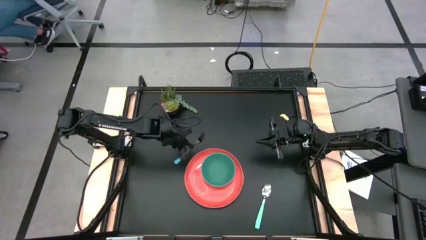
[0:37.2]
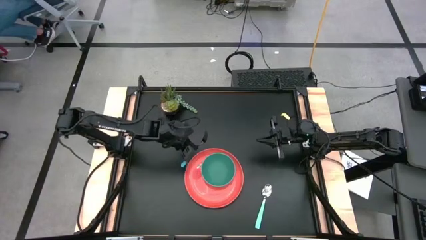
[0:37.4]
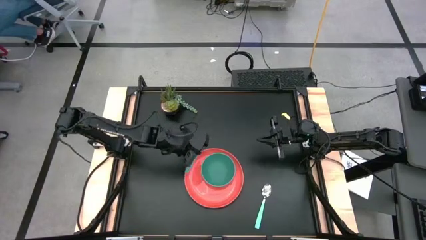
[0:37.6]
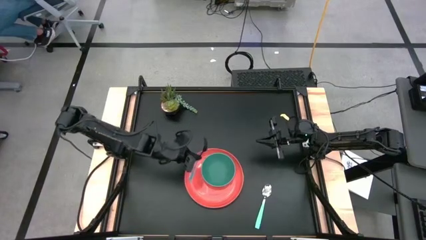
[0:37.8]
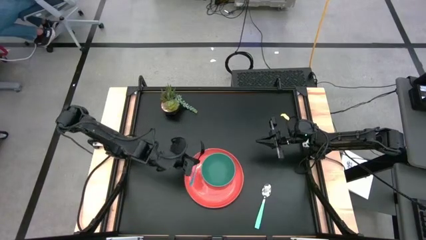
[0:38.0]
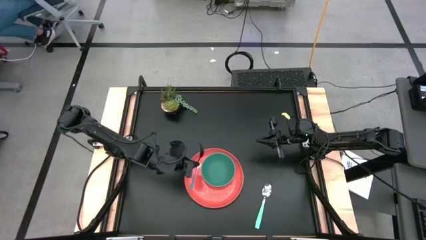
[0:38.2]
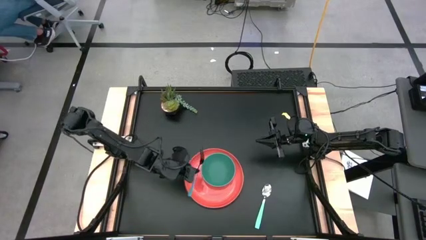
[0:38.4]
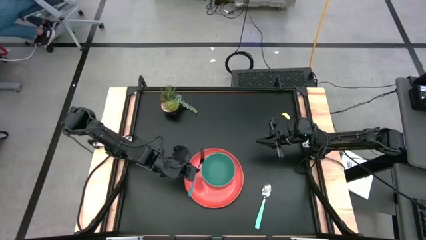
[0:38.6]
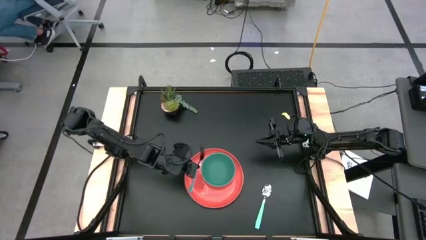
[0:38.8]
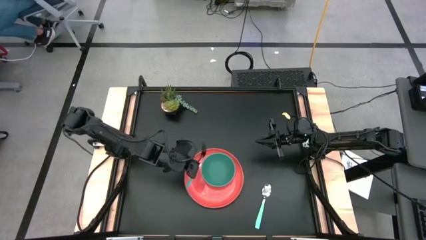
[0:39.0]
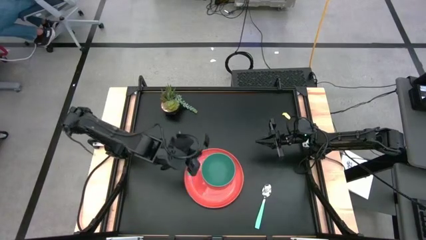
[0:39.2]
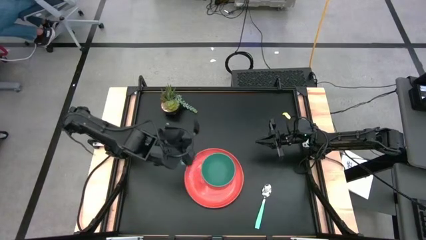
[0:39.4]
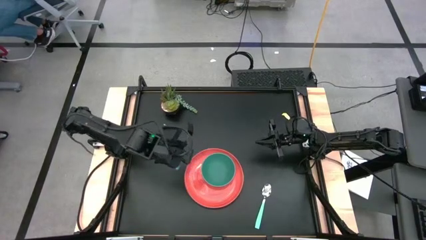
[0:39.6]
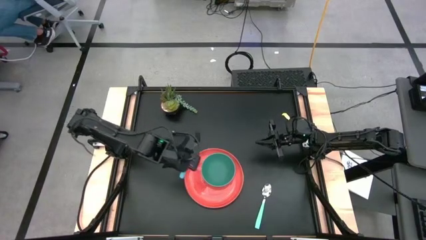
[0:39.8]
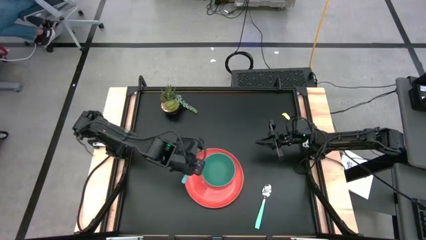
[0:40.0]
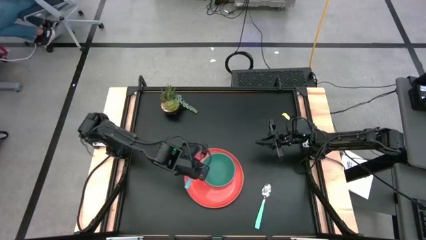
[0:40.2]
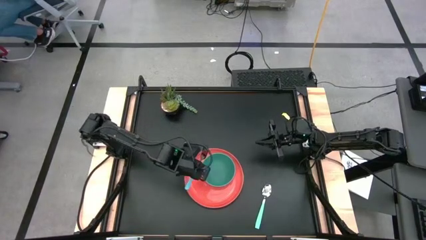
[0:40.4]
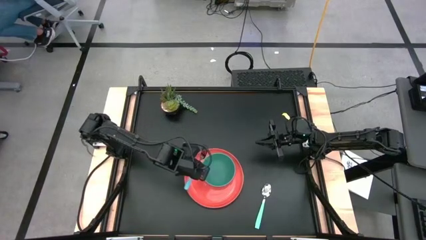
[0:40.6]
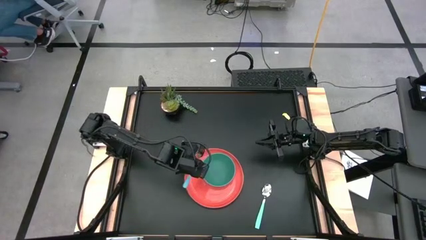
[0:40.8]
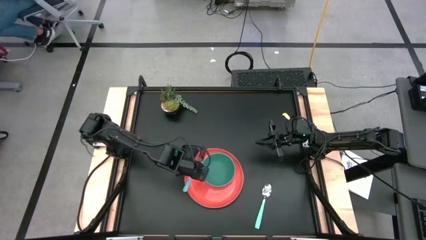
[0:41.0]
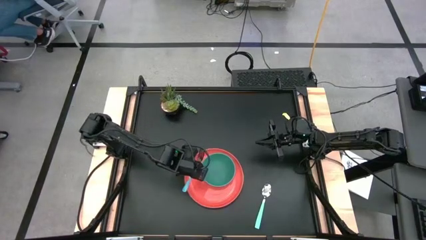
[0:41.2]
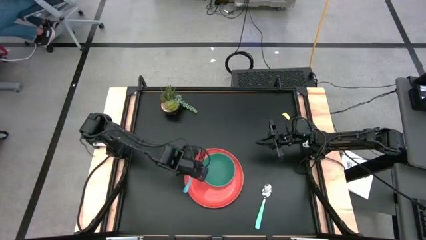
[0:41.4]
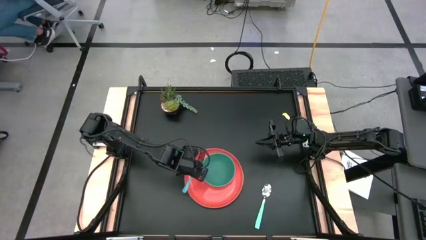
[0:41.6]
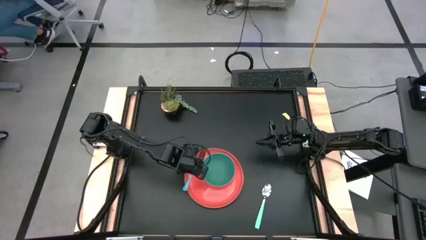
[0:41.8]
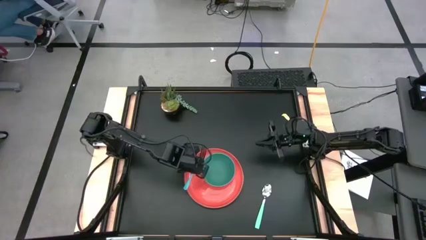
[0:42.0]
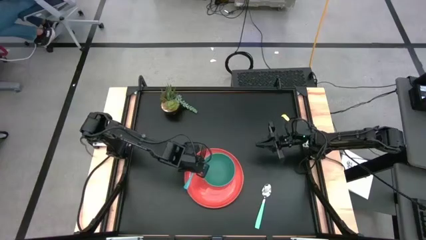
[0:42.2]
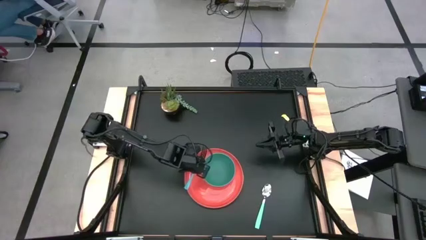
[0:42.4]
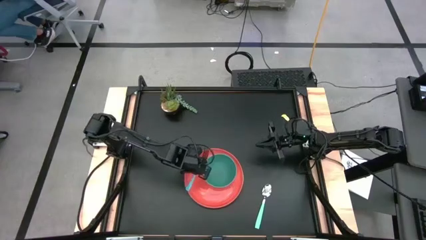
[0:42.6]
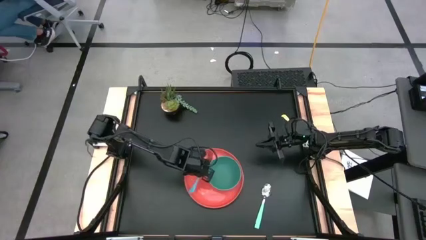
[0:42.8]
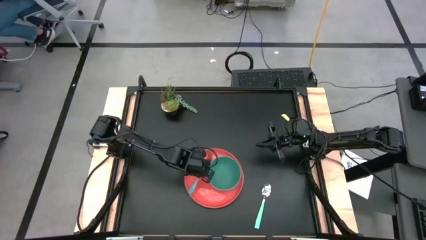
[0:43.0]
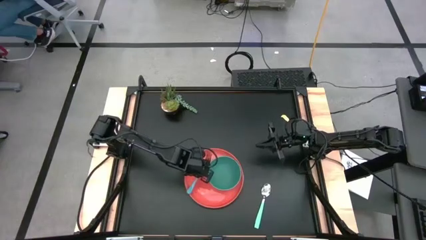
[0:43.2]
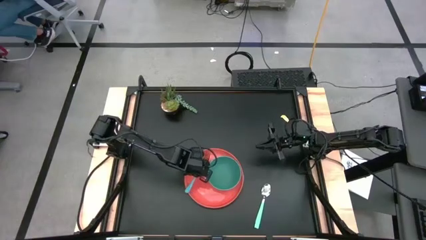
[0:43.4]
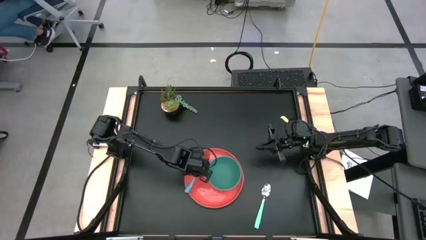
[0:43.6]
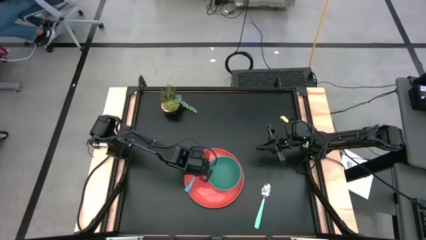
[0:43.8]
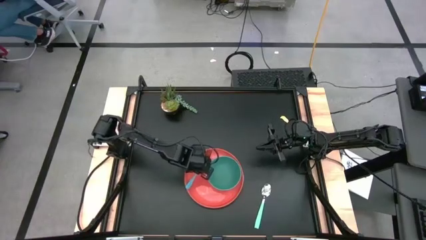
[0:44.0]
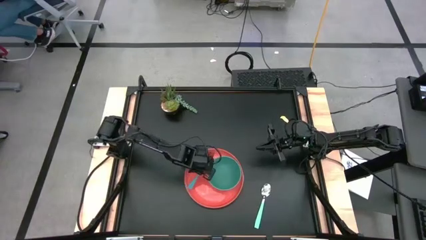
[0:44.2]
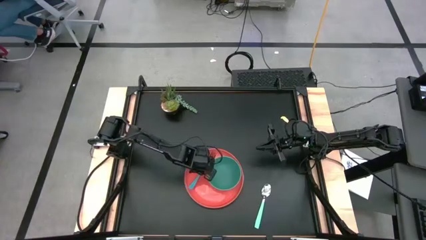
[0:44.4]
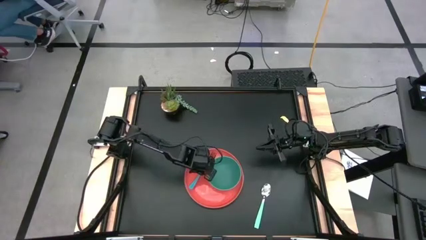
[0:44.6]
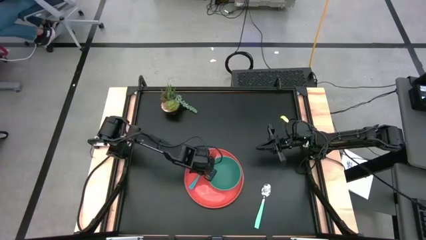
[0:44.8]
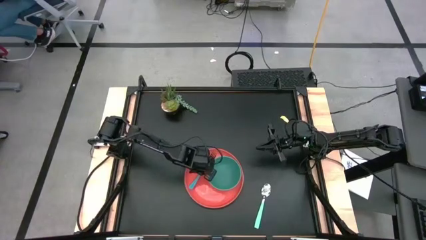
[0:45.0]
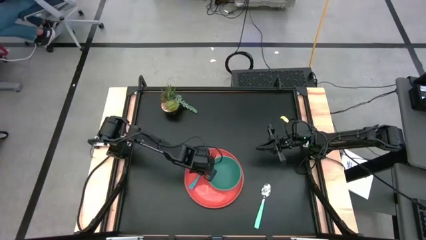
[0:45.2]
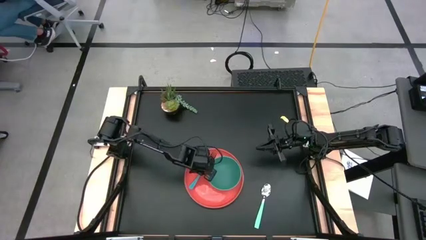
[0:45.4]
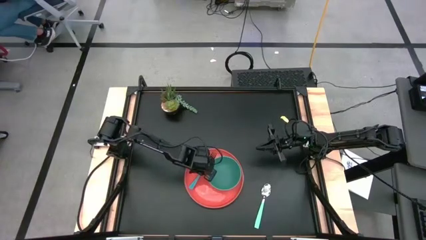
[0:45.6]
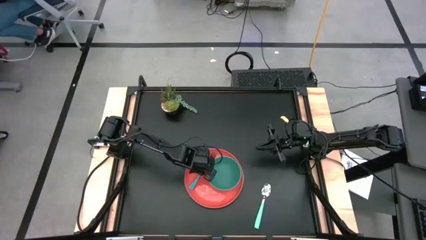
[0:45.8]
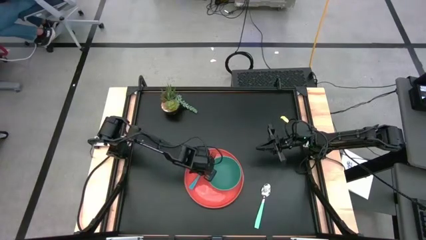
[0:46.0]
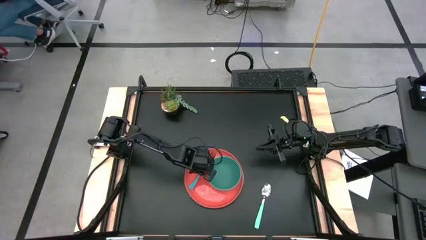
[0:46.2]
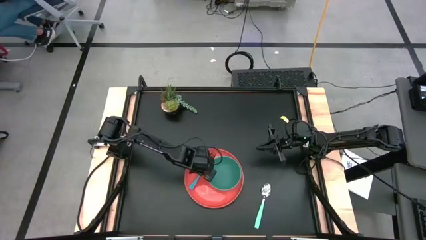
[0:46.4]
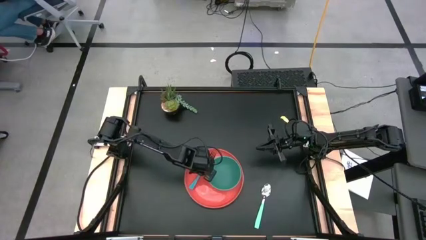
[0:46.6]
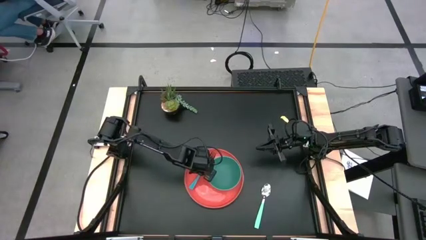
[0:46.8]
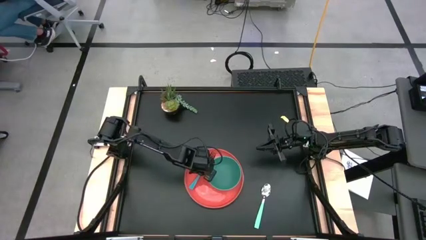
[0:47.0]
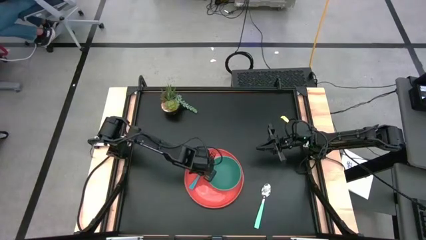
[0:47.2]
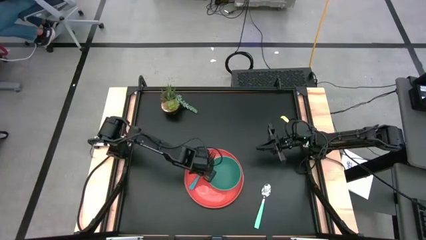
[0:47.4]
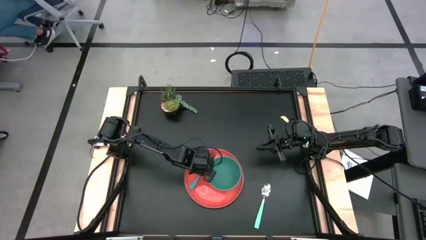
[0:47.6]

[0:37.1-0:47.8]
Task: Set table place
Put the blue fork to the left of the bowl green bowl on the orange plate
